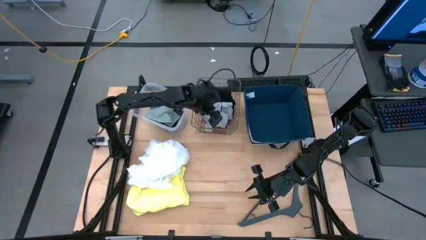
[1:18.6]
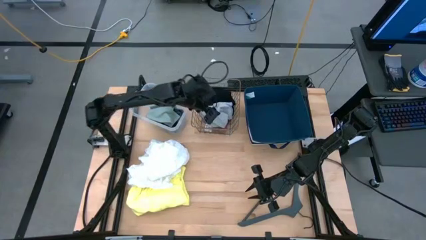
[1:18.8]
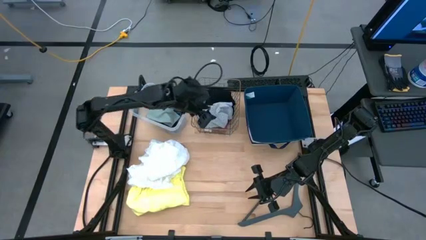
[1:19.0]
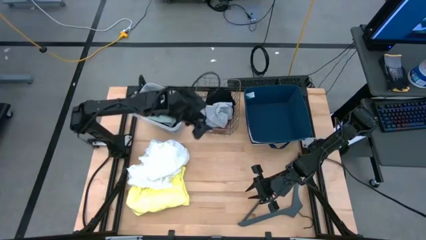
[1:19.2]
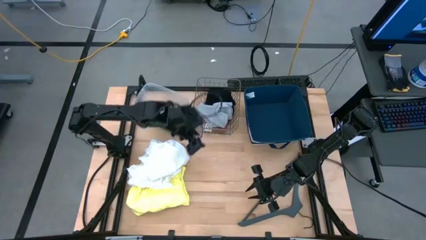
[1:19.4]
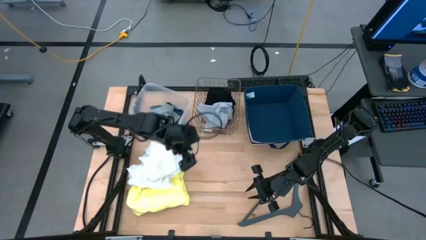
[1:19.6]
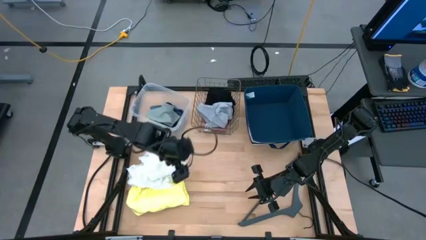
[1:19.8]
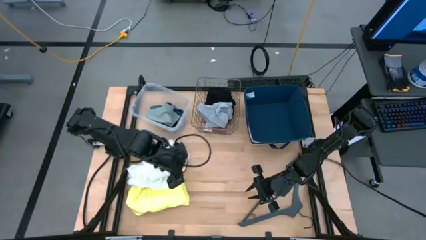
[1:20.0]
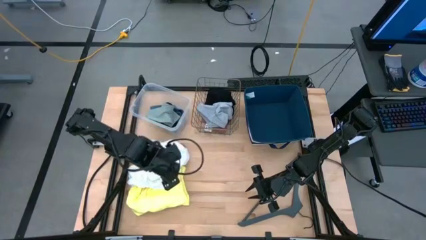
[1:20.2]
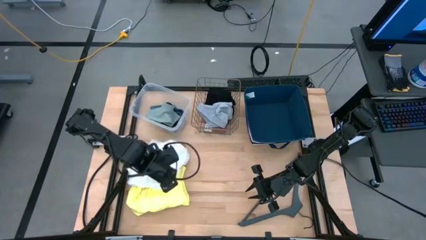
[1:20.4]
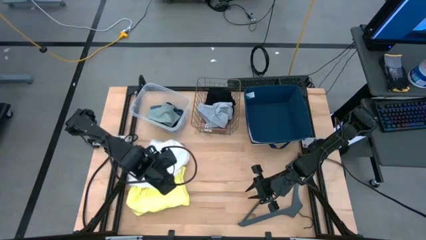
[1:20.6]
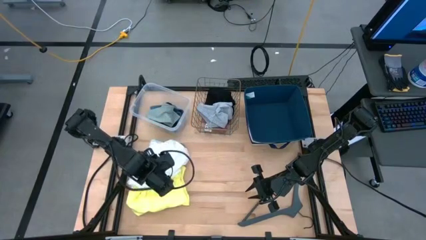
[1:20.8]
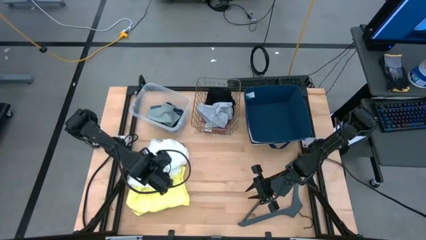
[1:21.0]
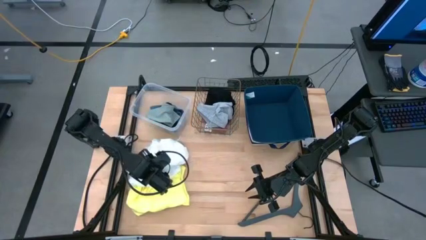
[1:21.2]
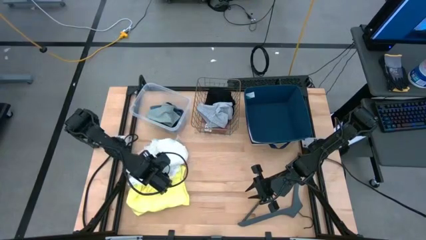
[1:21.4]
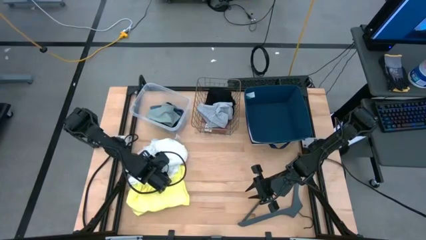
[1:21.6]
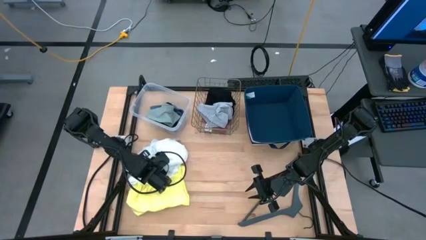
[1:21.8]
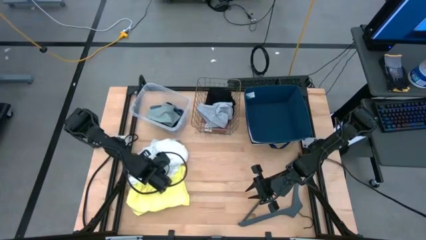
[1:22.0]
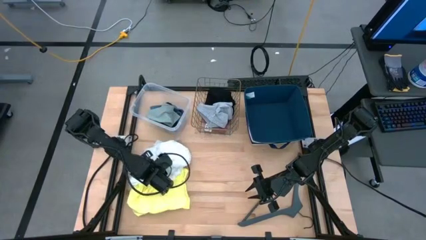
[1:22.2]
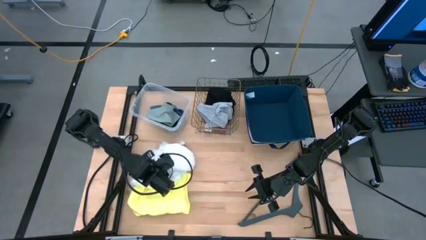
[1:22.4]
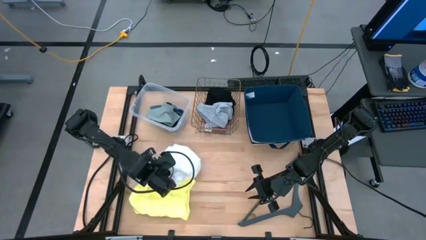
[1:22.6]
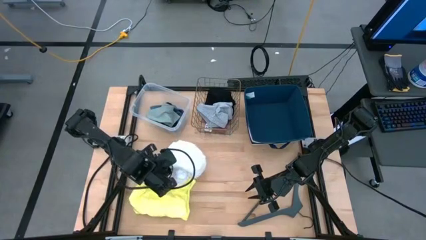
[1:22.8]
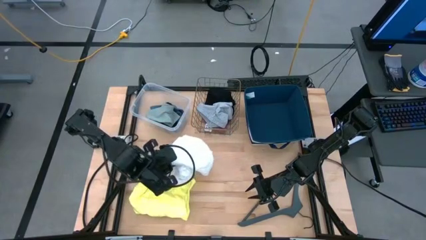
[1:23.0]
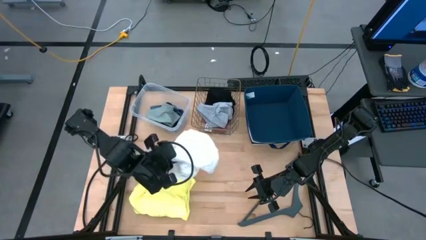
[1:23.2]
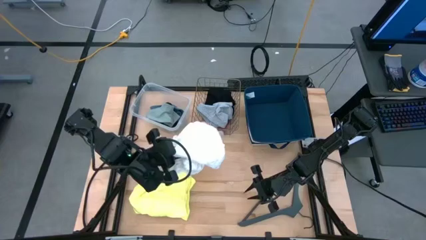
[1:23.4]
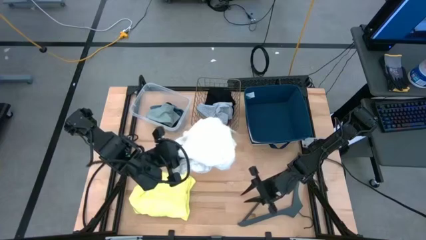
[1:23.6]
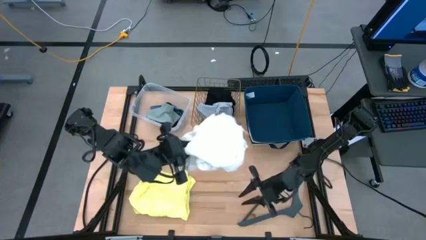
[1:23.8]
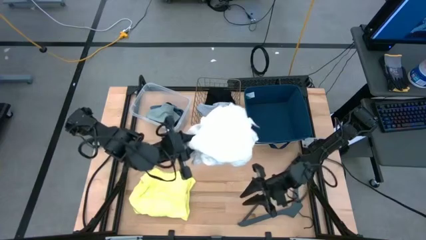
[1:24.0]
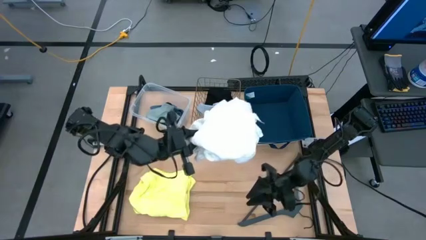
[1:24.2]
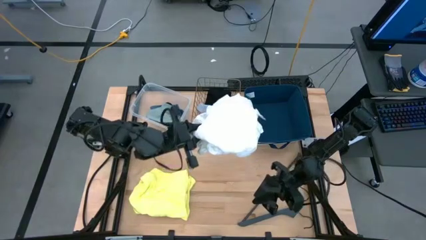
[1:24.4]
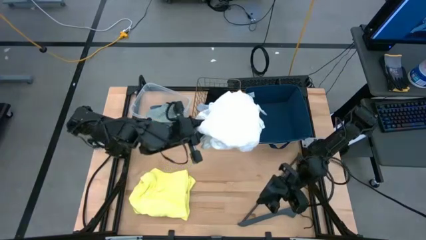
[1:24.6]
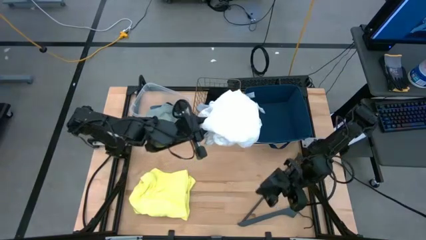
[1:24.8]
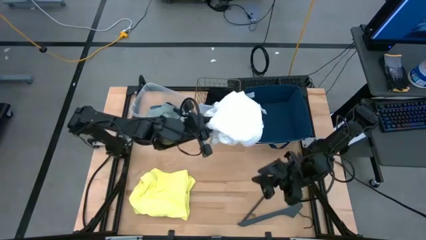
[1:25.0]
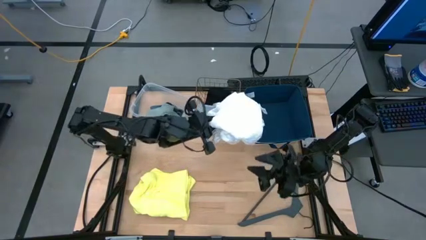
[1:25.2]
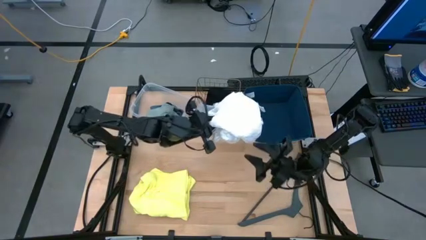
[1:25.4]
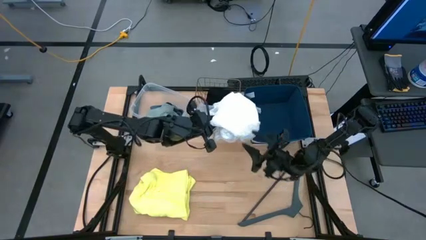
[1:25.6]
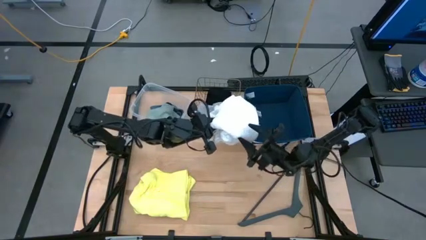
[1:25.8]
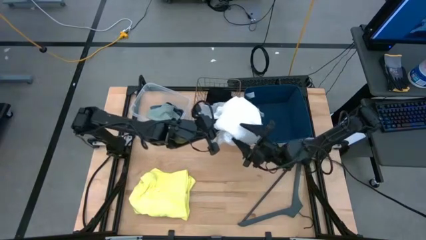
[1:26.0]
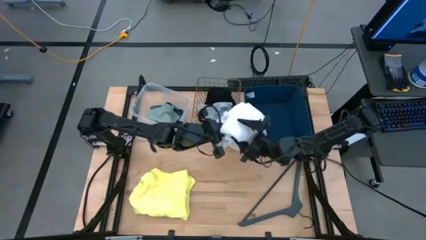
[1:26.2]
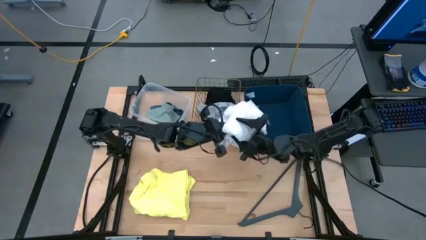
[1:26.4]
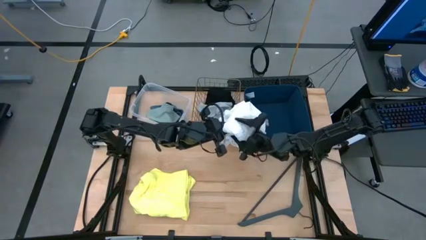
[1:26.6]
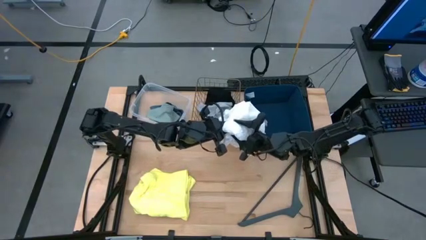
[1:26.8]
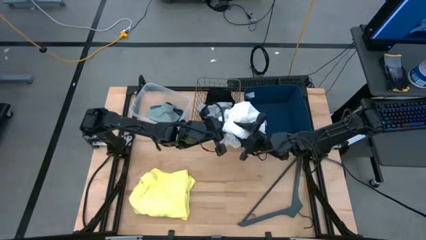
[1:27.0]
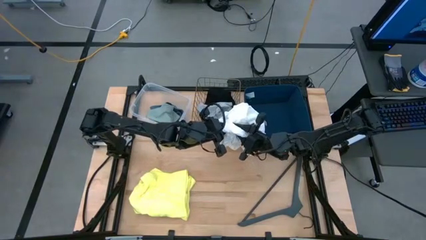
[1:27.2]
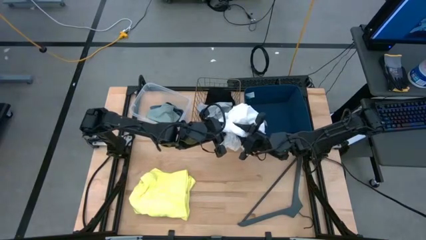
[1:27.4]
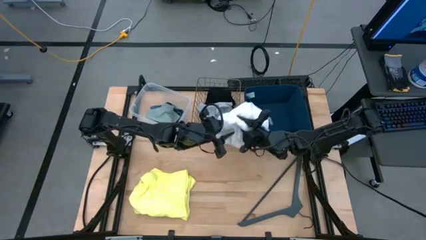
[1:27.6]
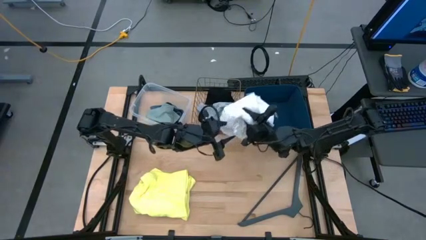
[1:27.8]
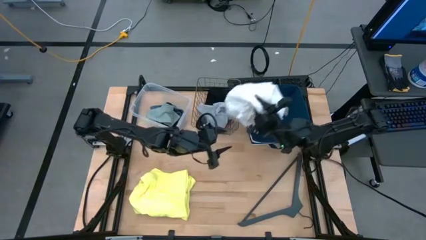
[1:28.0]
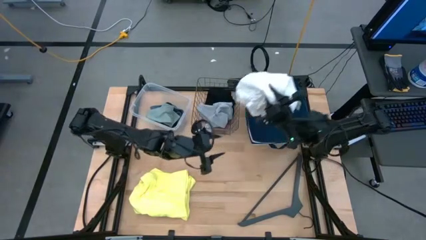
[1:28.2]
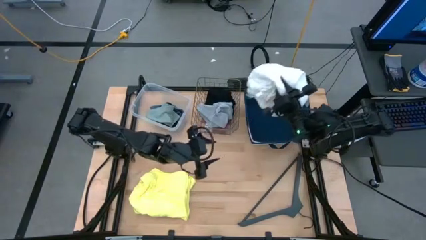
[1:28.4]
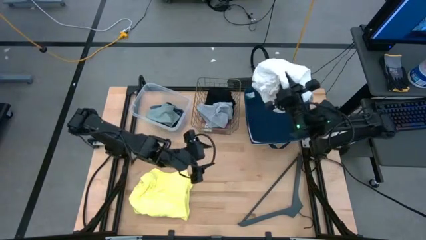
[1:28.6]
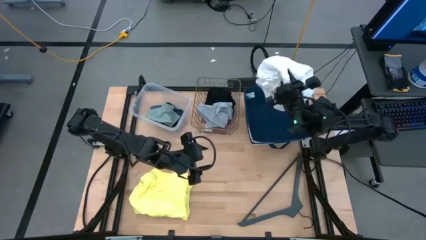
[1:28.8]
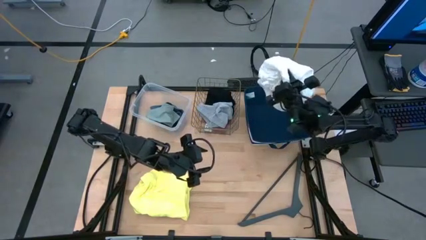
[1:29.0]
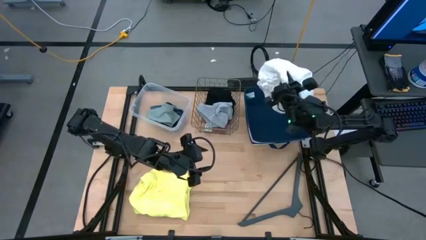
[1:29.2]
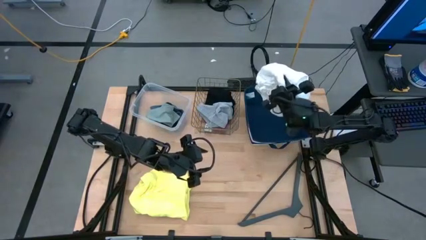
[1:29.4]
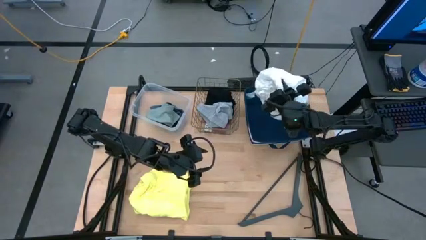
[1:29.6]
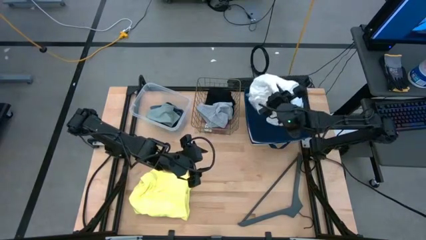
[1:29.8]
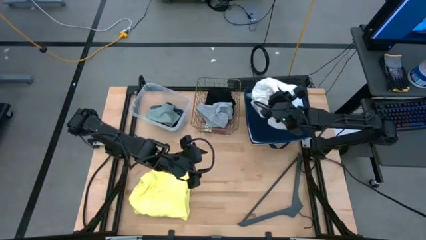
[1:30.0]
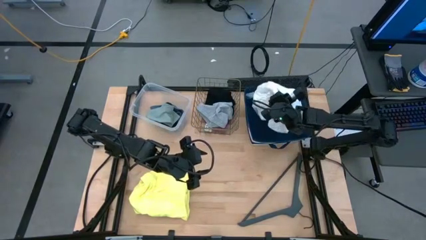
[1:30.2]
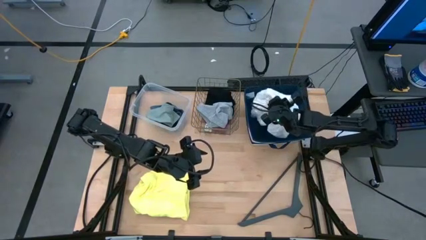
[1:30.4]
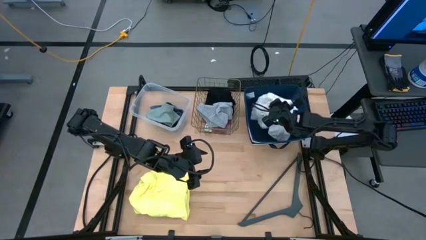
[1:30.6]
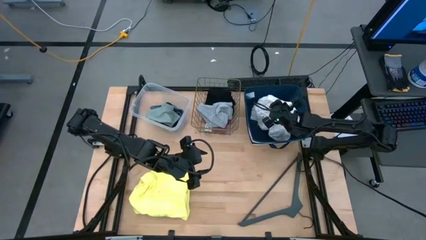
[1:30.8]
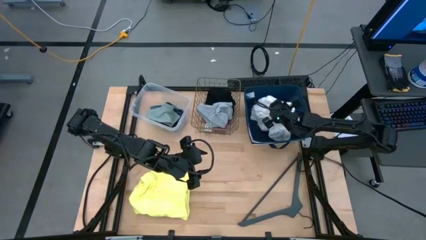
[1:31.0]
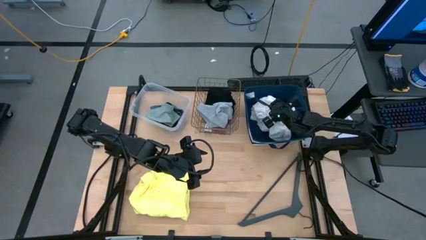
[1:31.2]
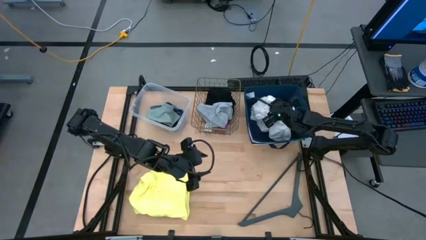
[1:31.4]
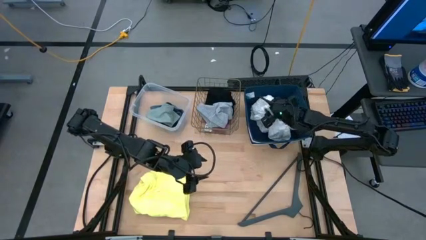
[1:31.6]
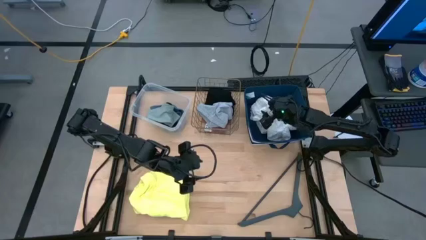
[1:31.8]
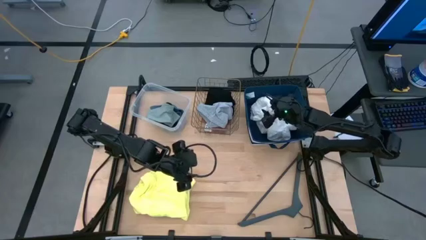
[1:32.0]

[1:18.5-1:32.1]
Task: Pick & Place Cloths
Put the white dress into the blue laundry organizer
